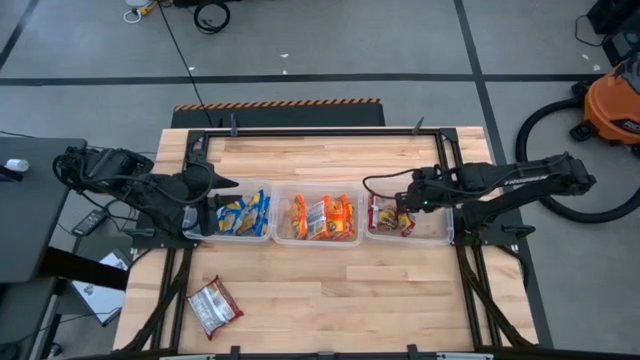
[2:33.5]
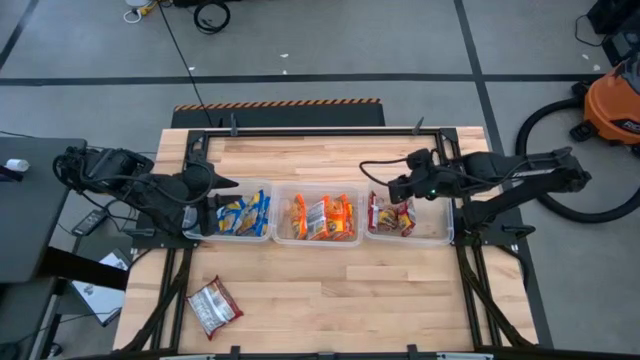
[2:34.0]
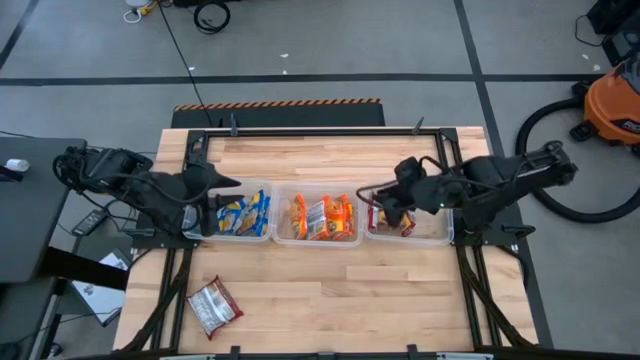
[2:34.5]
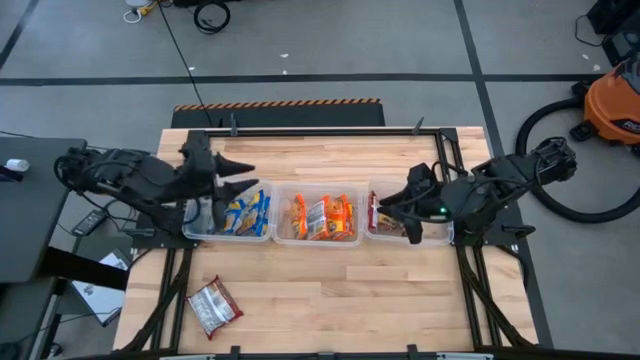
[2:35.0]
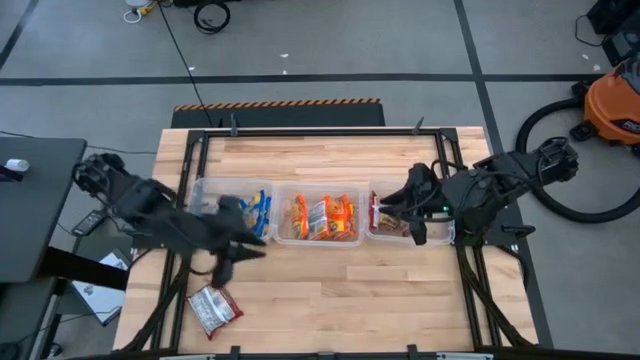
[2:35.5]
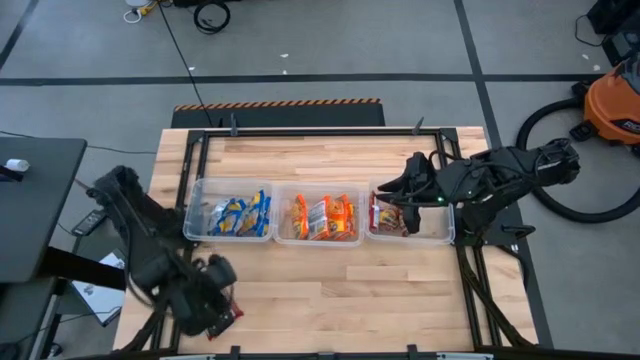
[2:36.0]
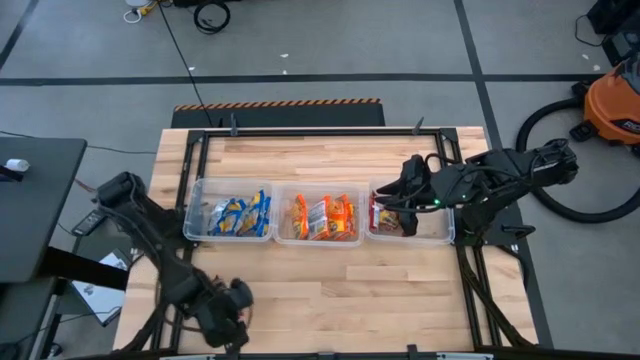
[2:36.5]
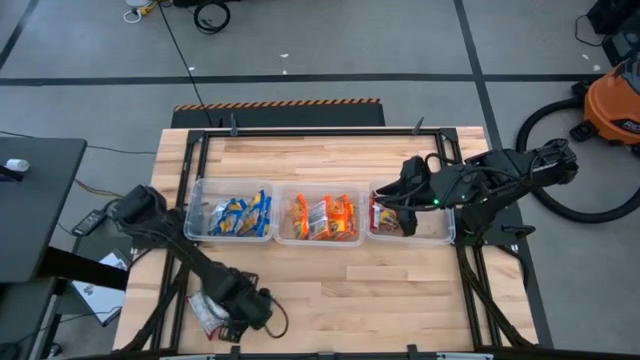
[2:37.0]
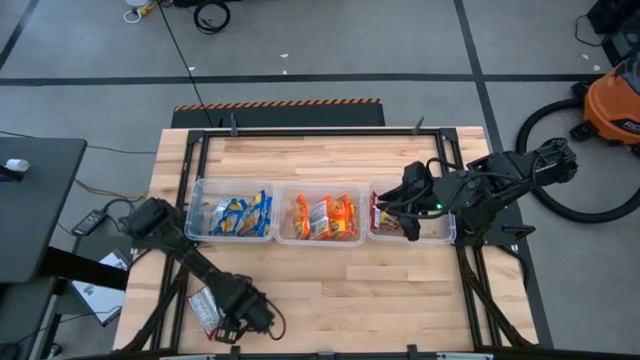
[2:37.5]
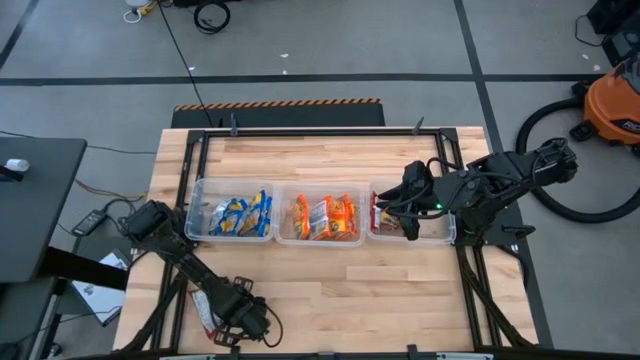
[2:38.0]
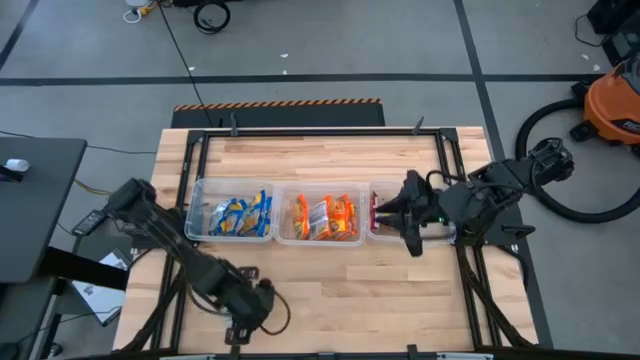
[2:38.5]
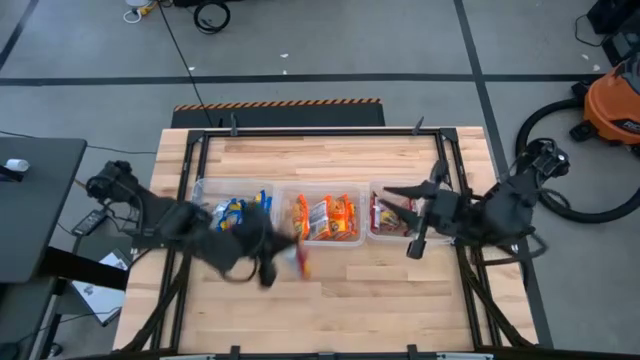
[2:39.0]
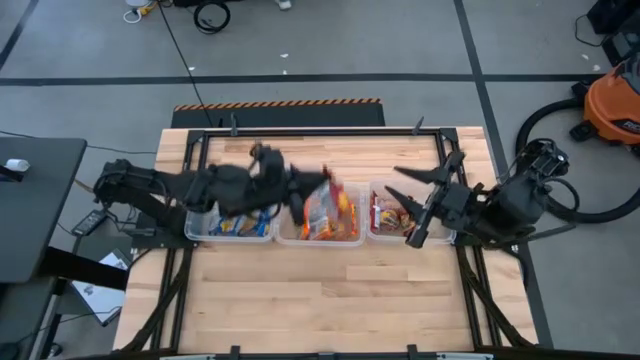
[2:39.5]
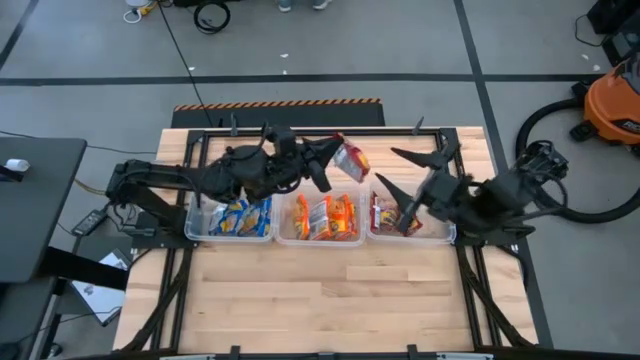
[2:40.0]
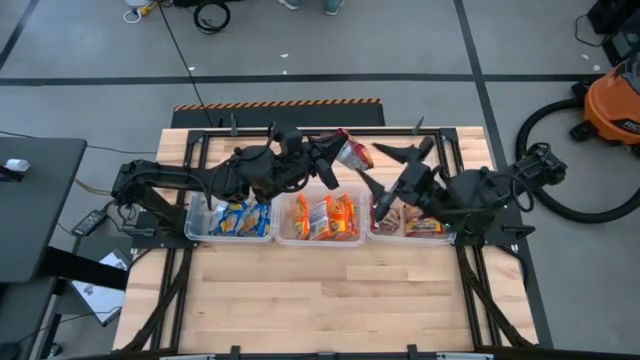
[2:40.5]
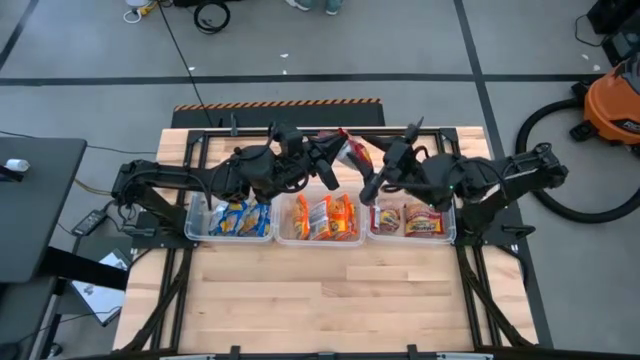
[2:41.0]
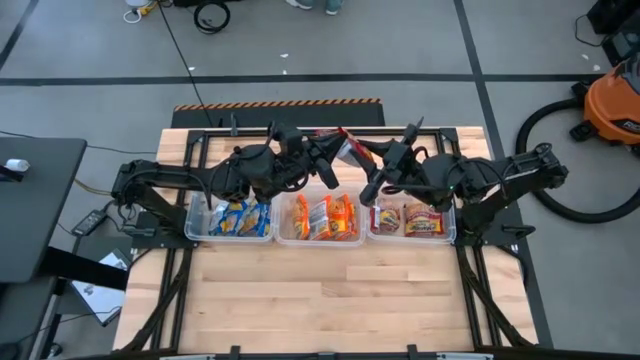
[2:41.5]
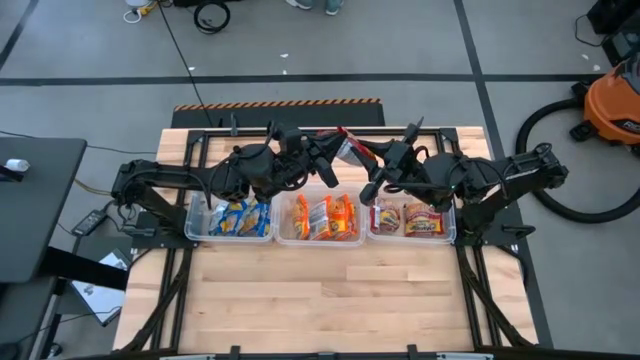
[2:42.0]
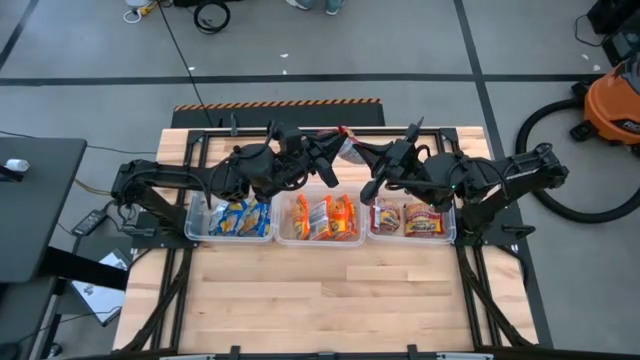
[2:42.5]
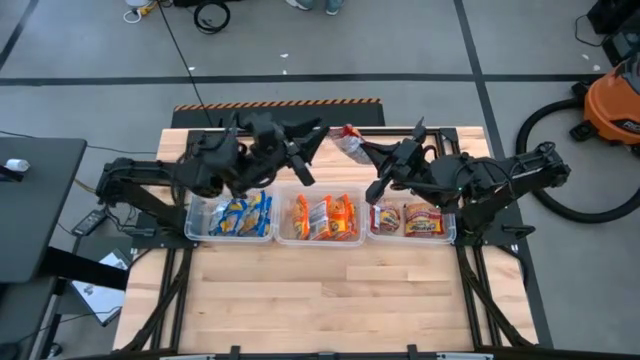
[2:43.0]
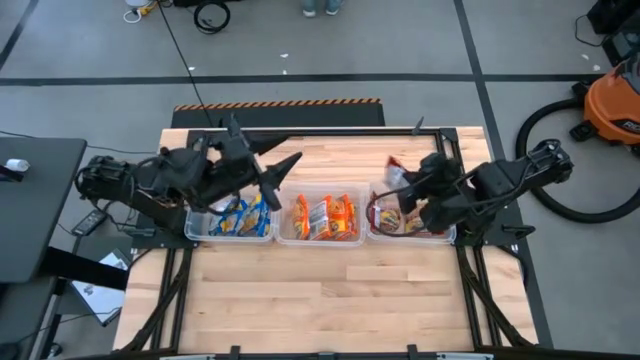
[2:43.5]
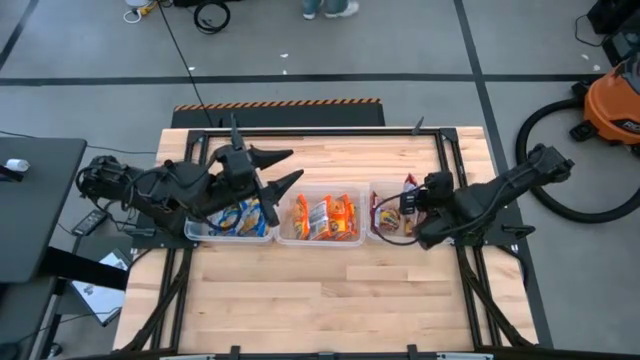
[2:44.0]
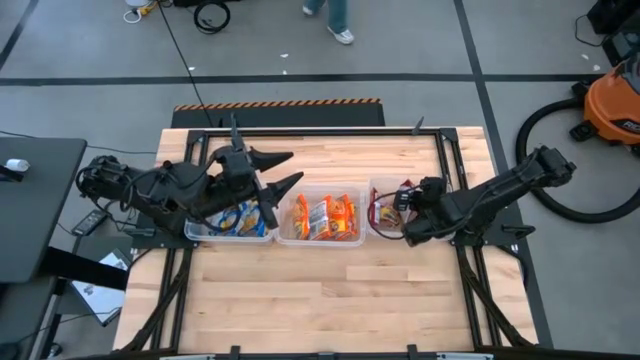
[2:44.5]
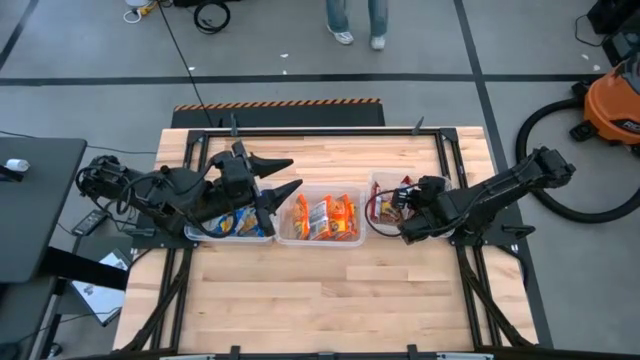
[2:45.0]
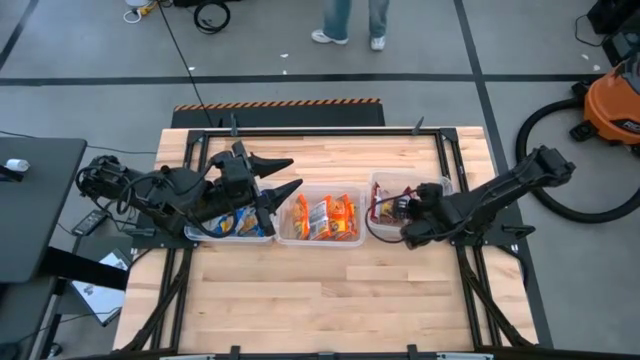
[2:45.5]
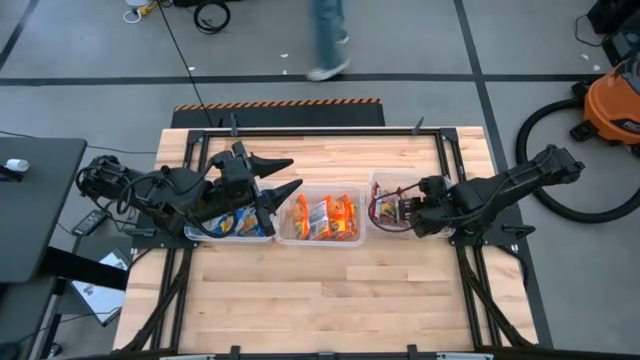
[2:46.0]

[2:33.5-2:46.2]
Task: Sort Maruchan noodles
Put the red noodle pack into the right transparent bin

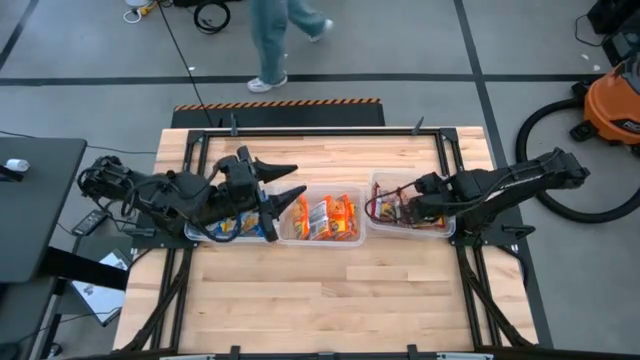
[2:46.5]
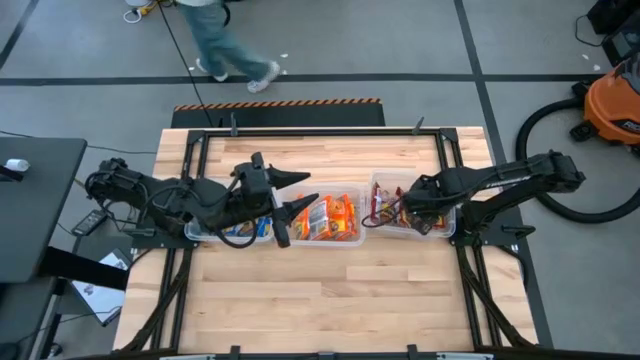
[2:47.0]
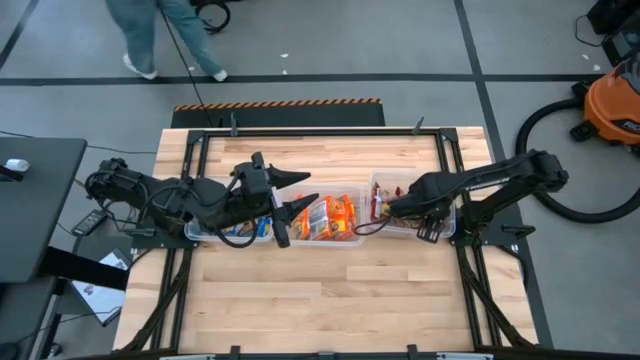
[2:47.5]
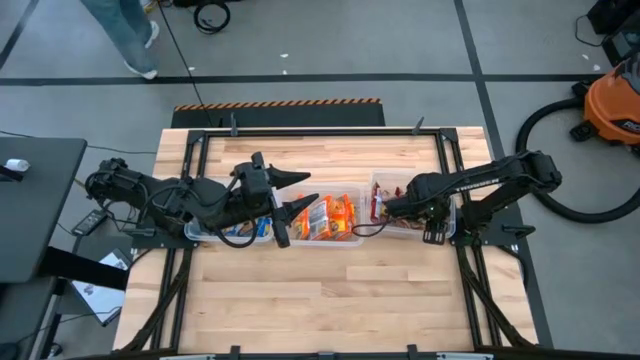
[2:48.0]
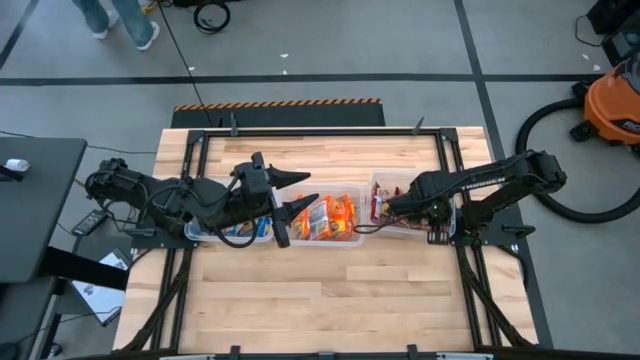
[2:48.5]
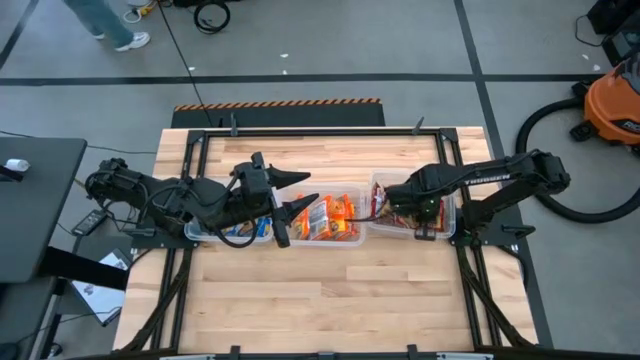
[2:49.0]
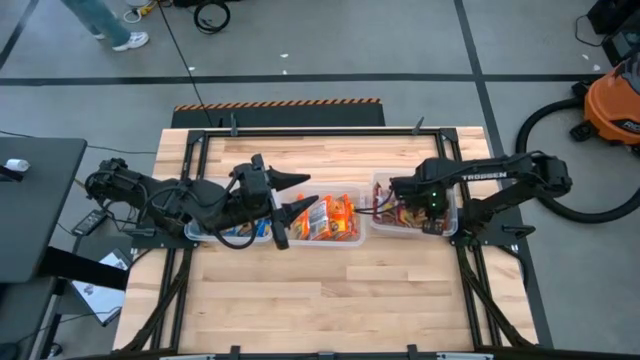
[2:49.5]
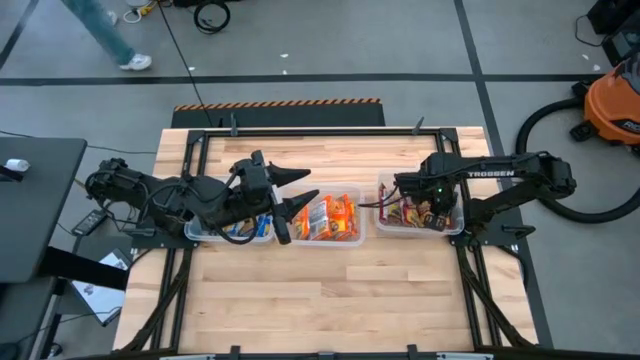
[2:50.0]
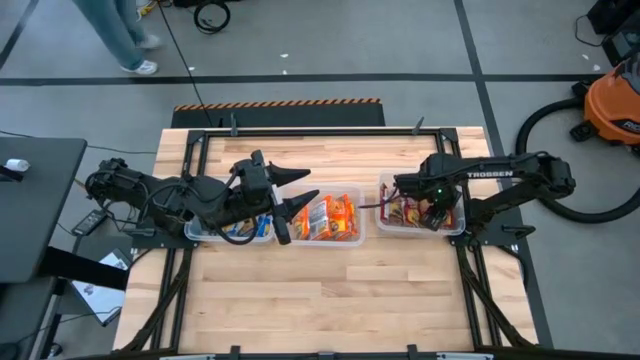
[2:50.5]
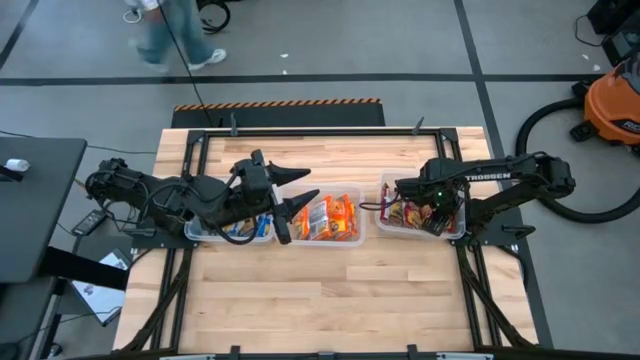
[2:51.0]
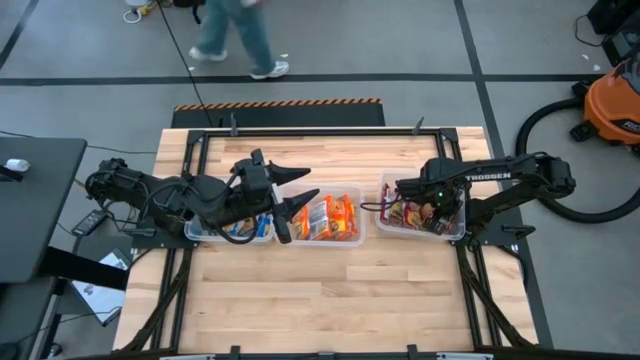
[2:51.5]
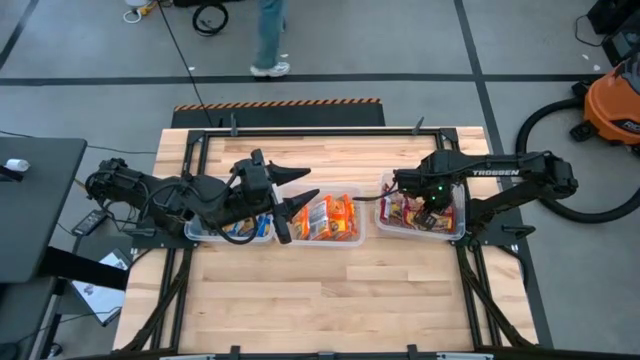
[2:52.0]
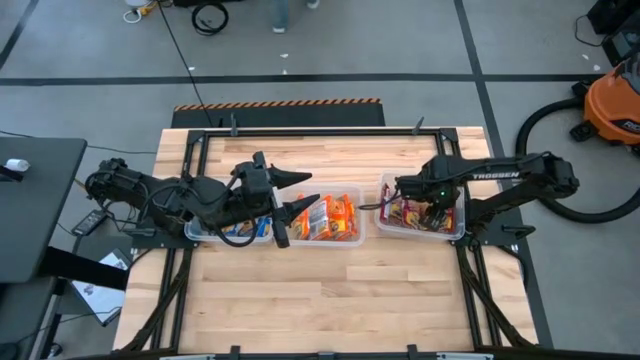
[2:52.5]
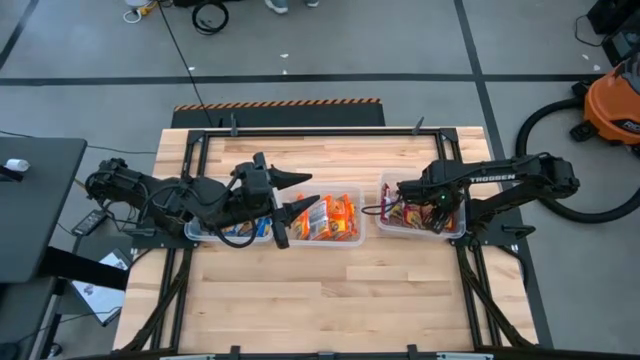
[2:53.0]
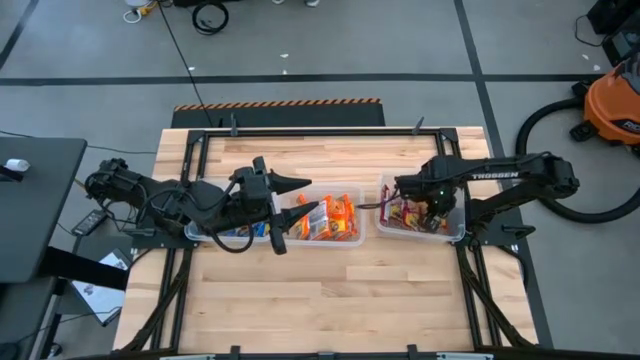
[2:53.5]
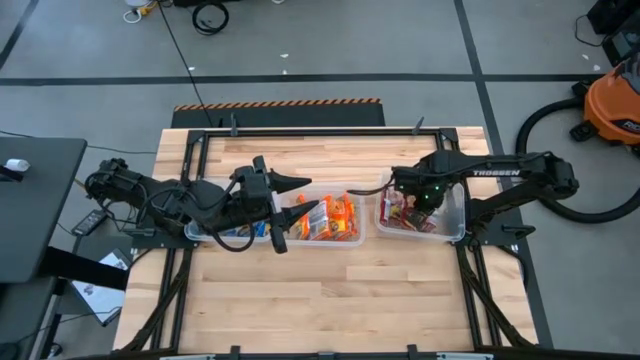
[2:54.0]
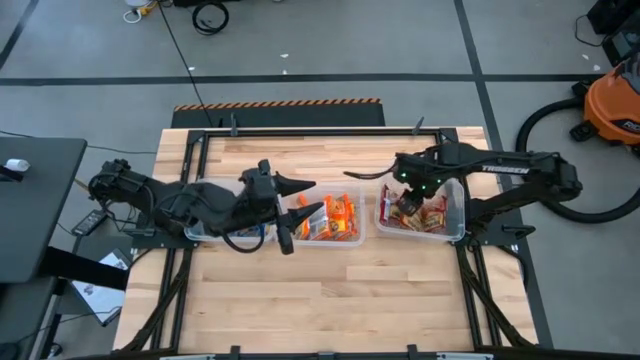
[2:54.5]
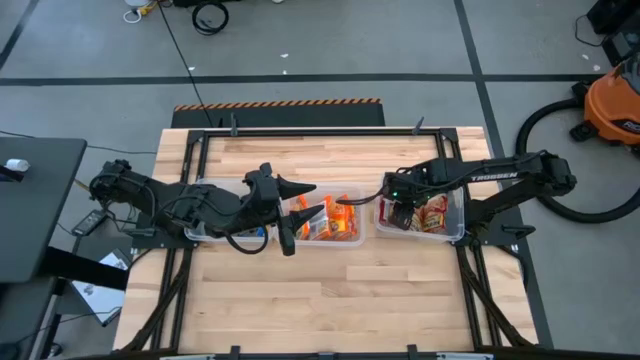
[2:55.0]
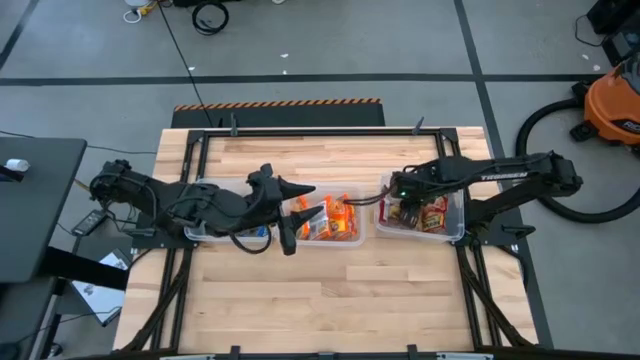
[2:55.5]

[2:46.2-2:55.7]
Adjust the red noodle packs
